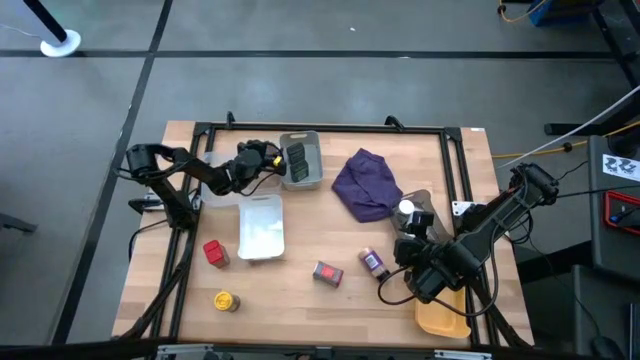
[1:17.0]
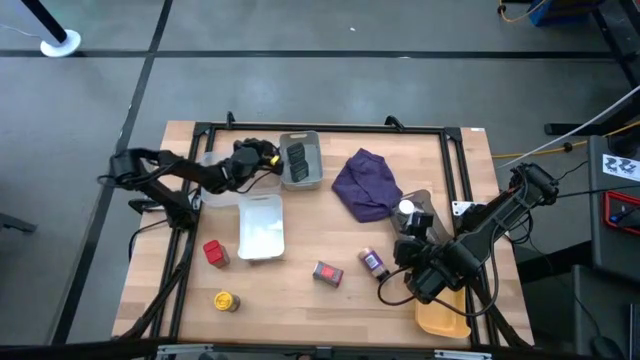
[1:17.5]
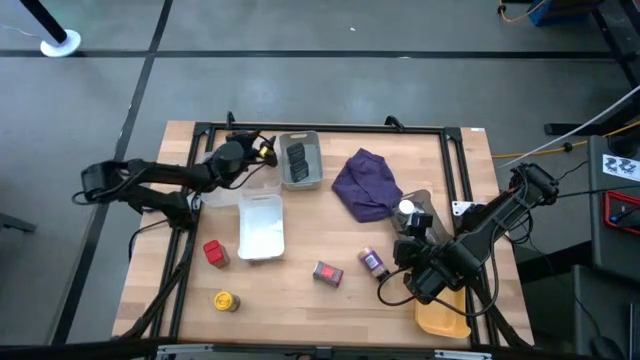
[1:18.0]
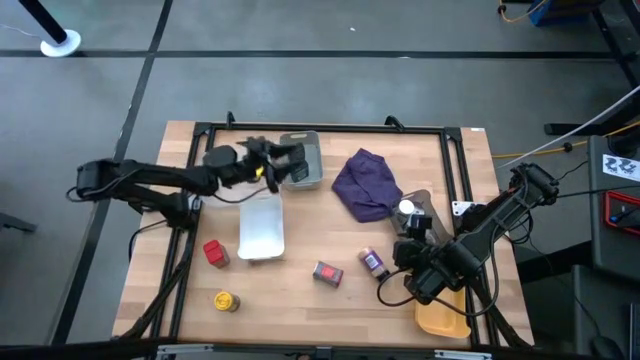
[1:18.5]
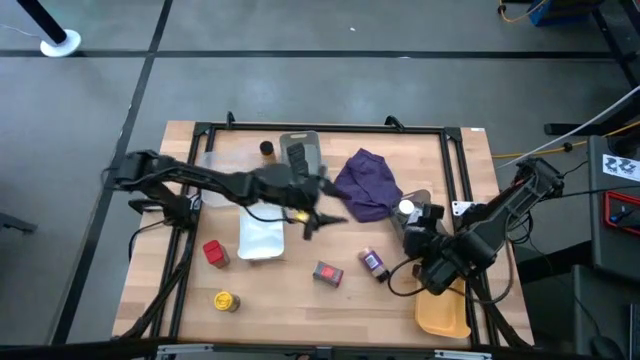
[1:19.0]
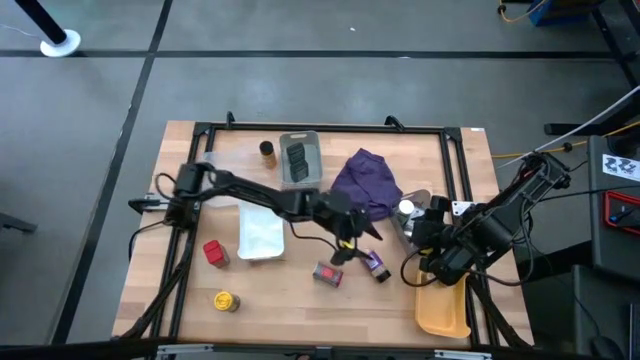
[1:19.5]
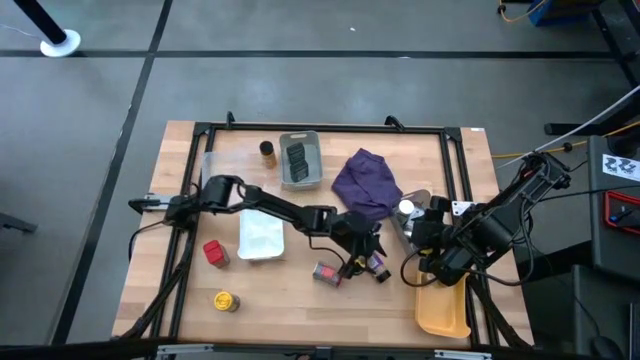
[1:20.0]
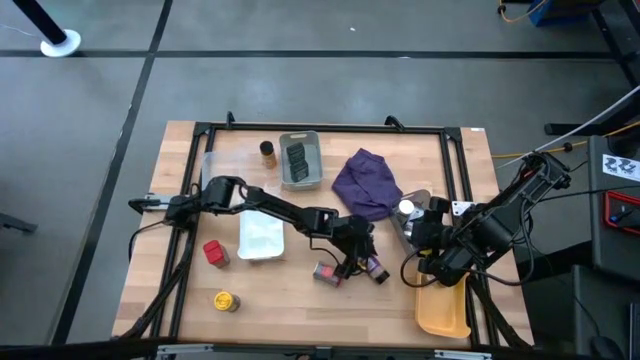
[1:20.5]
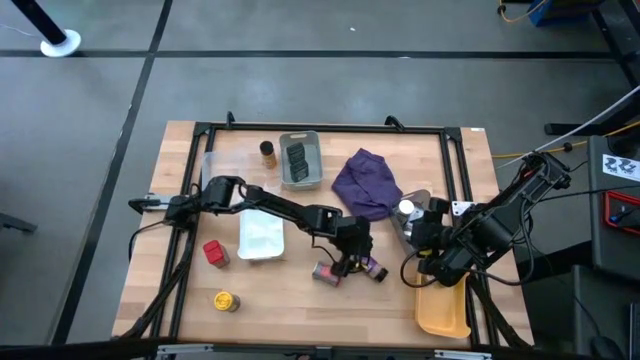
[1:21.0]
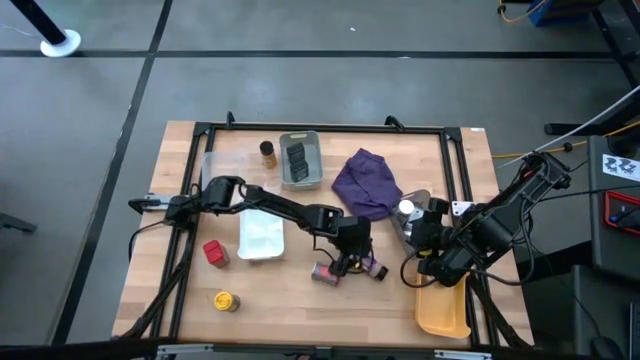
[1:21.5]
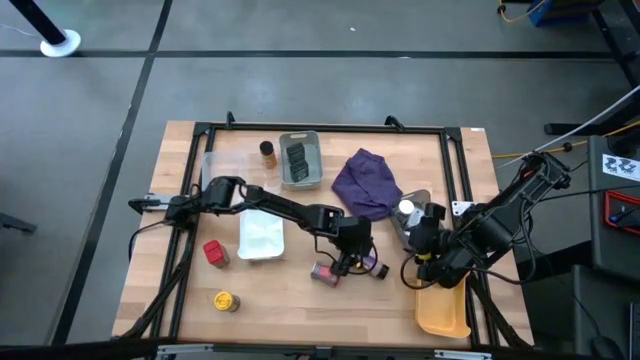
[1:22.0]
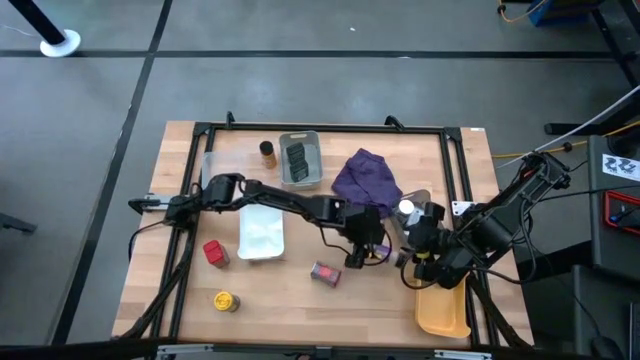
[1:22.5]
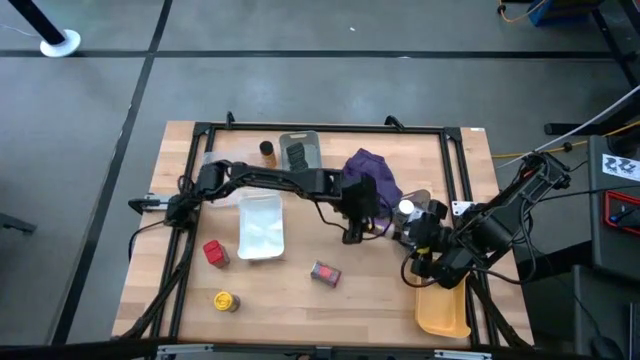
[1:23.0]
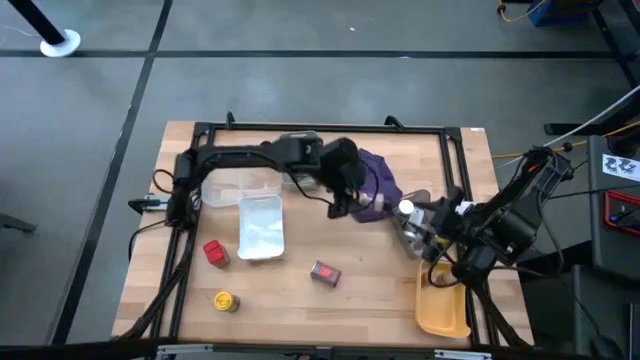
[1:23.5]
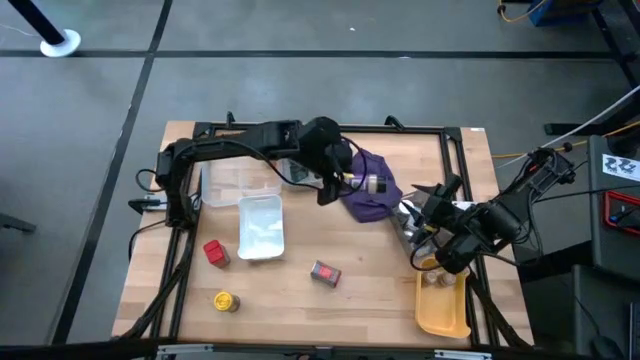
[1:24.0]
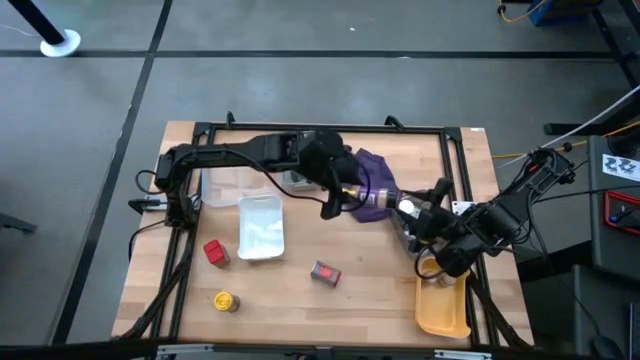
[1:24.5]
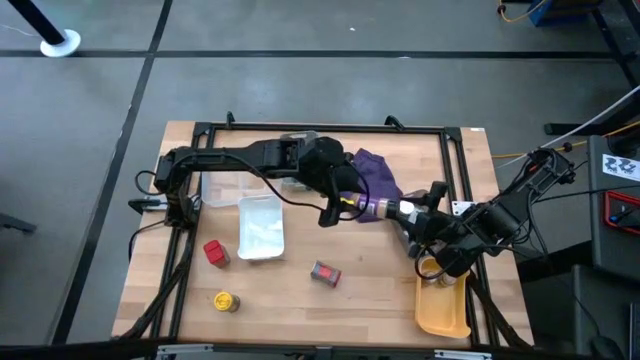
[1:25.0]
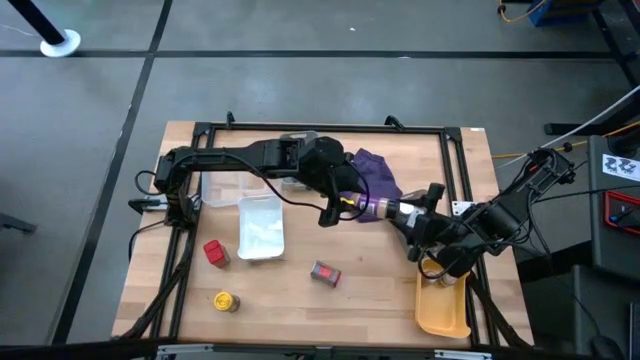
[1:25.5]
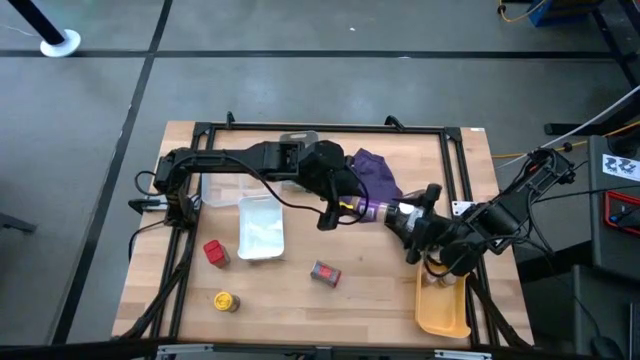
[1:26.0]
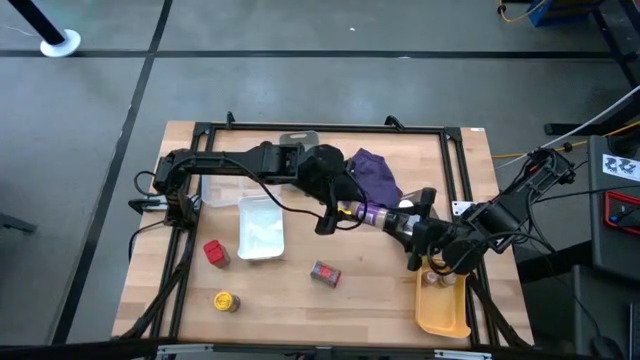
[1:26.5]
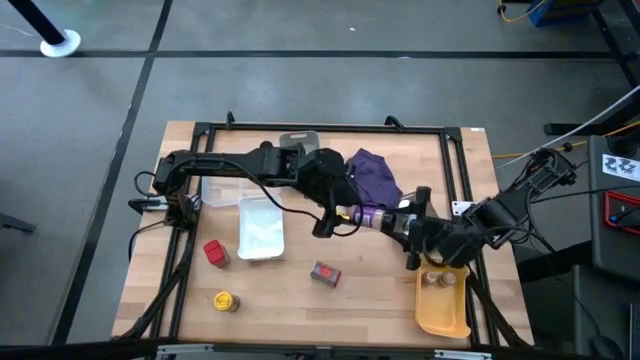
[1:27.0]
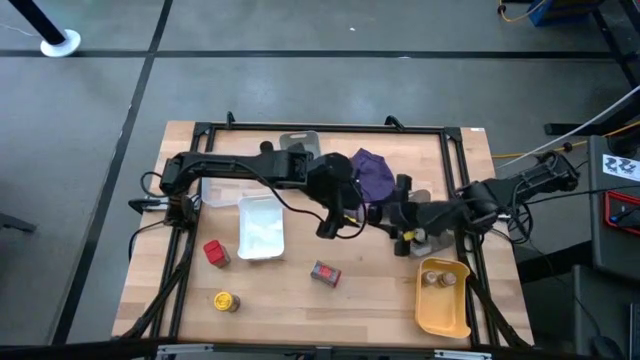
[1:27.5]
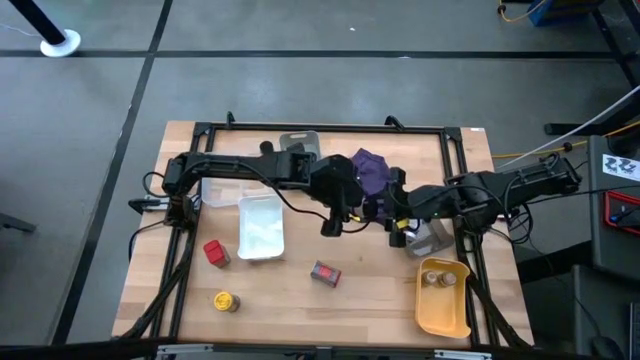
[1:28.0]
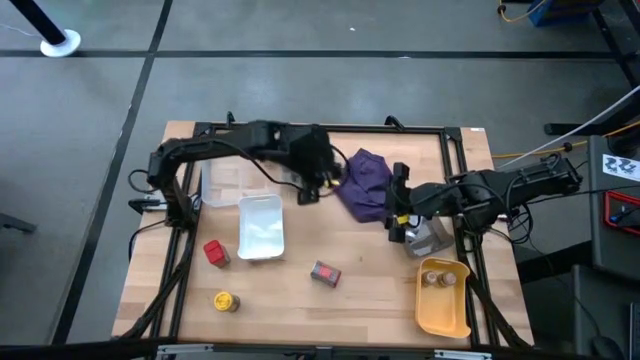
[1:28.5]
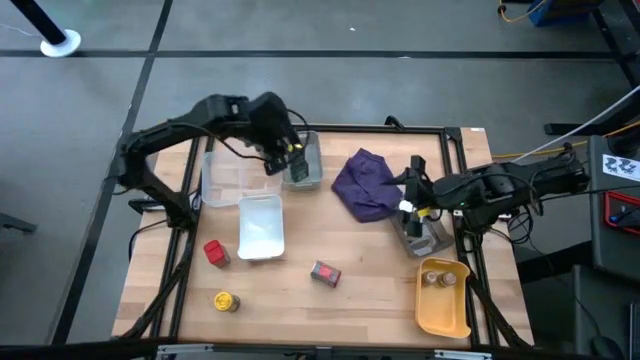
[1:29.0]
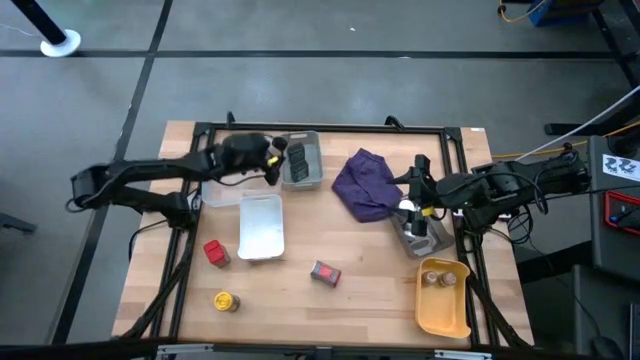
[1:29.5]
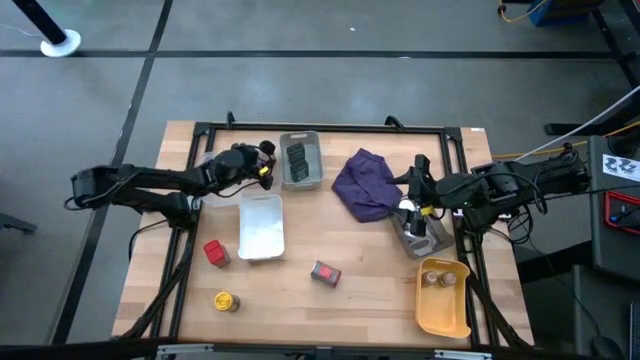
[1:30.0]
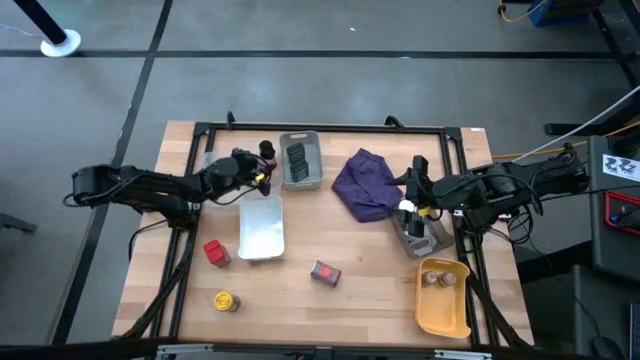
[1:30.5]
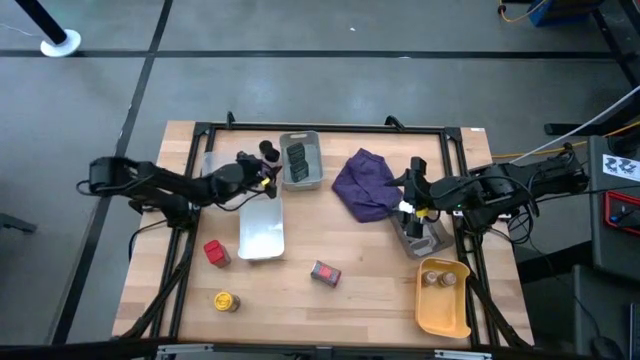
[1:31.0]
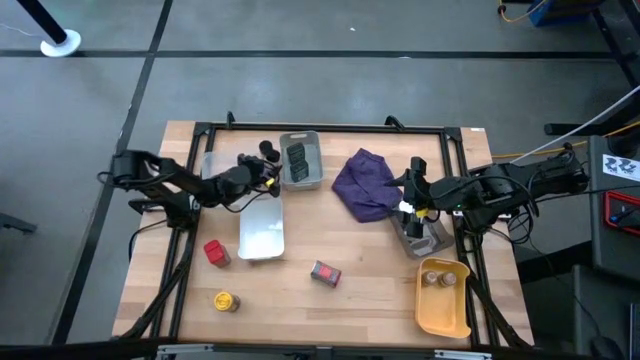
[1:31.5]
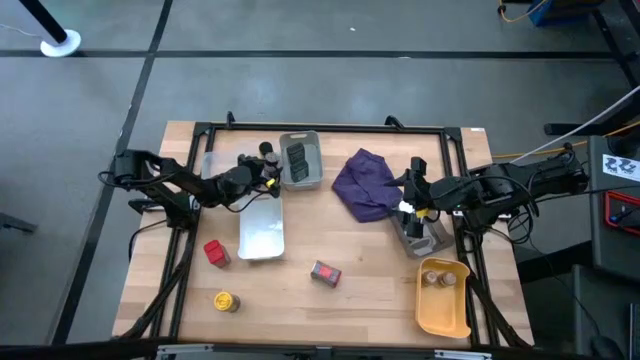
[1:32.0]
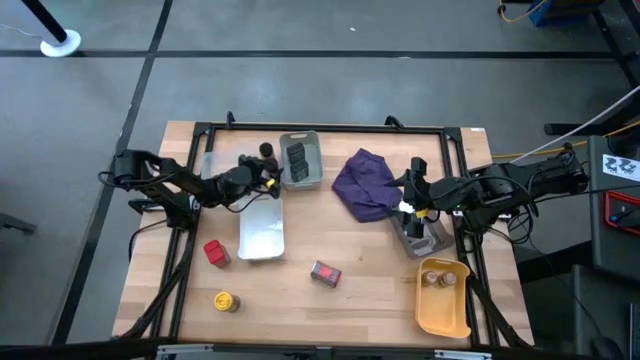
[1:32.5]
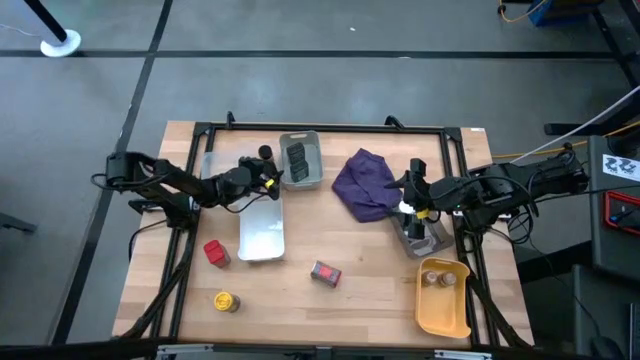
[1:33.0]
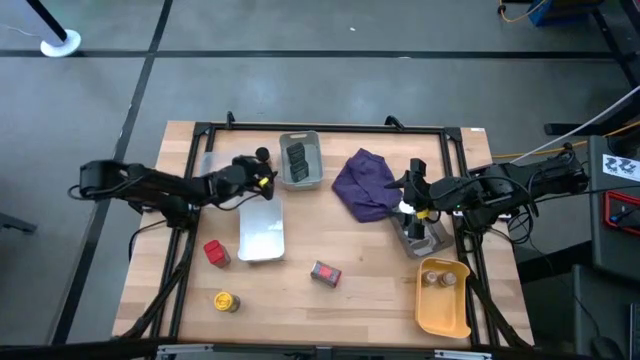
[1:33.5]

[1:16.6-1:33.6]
Task: Sort spices by type
Put the black seasoning bottle into the top right transparent bin

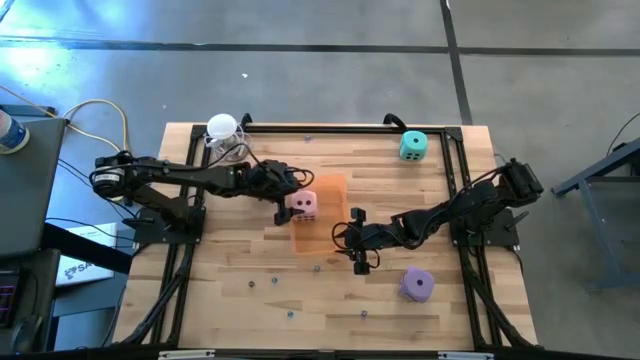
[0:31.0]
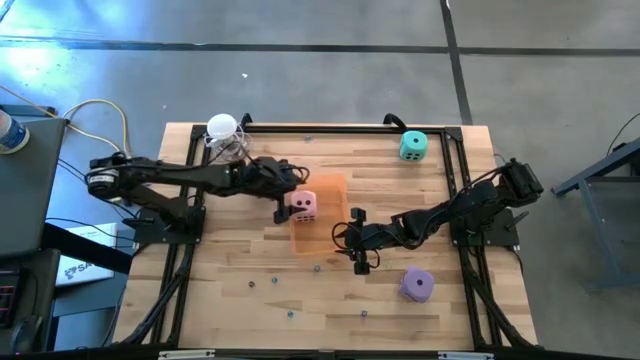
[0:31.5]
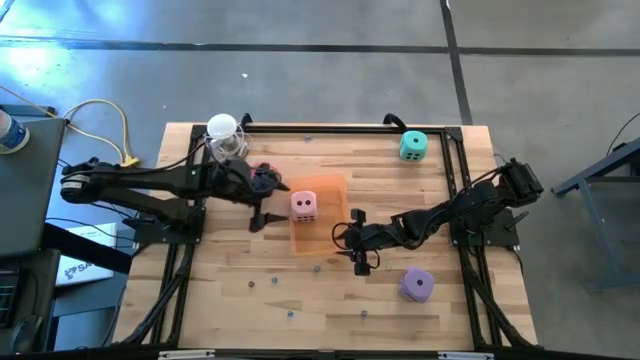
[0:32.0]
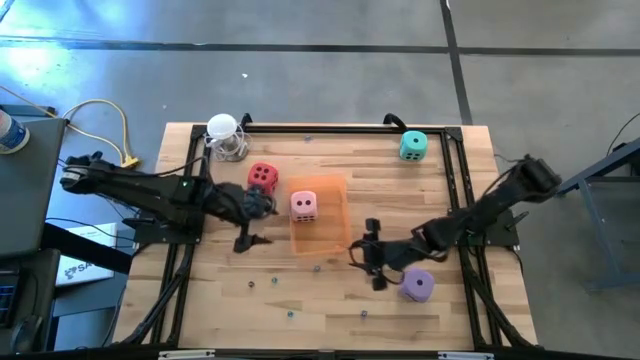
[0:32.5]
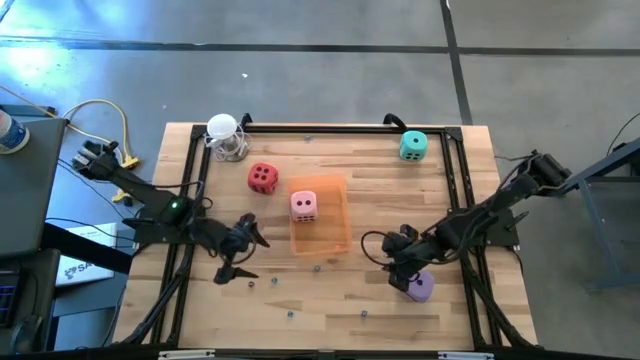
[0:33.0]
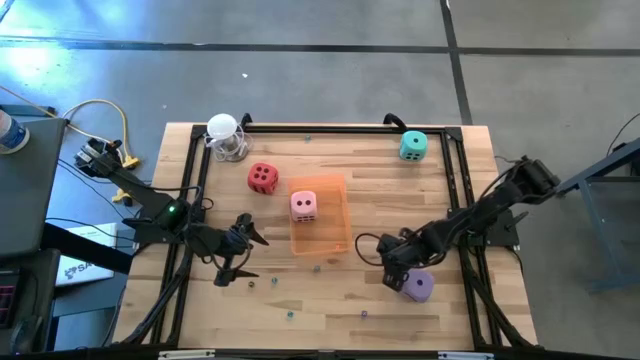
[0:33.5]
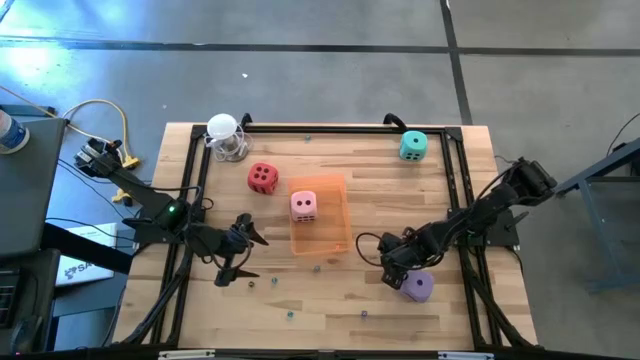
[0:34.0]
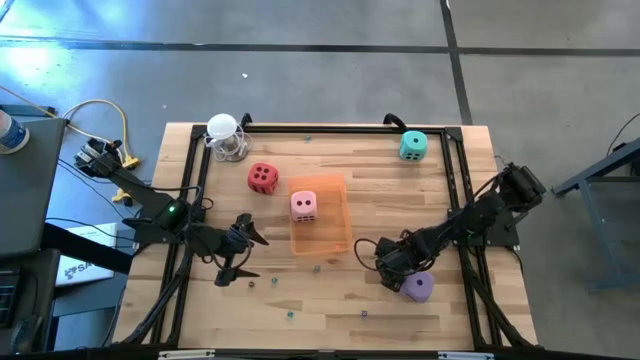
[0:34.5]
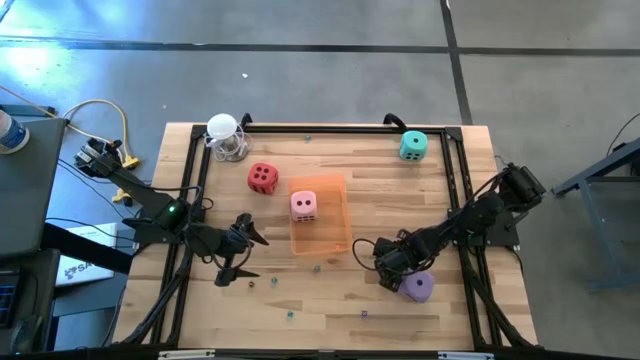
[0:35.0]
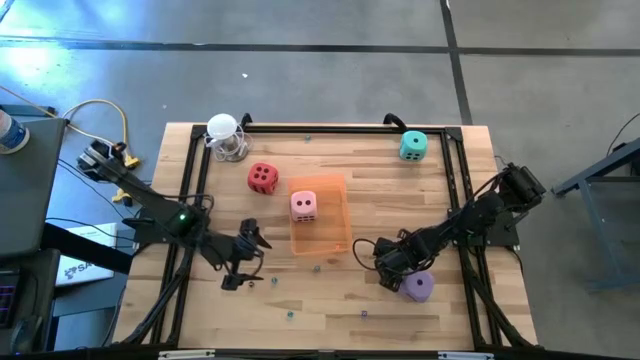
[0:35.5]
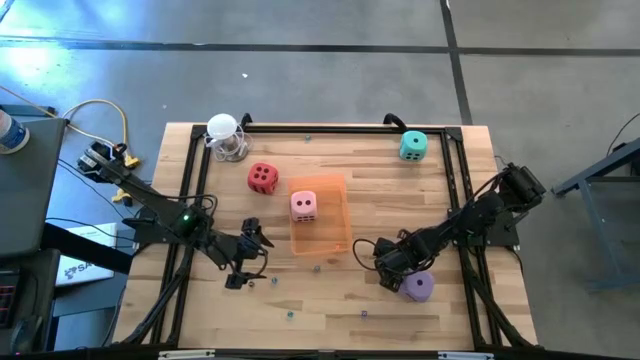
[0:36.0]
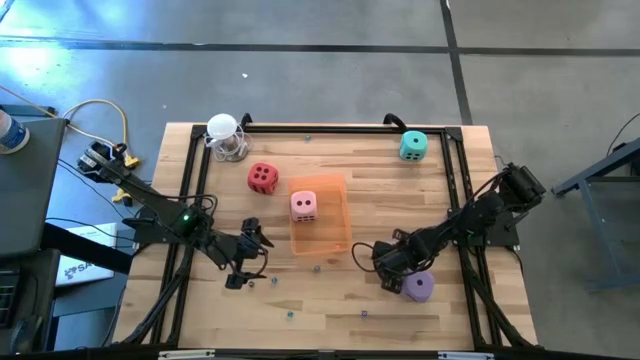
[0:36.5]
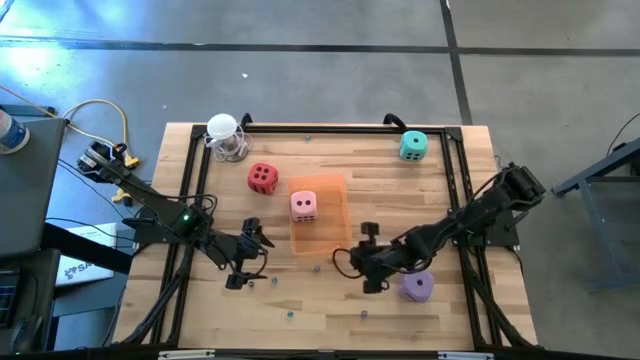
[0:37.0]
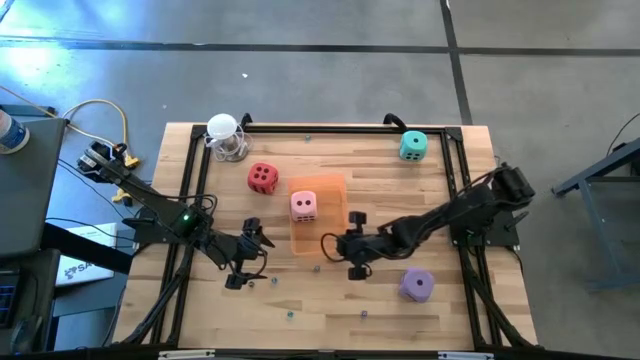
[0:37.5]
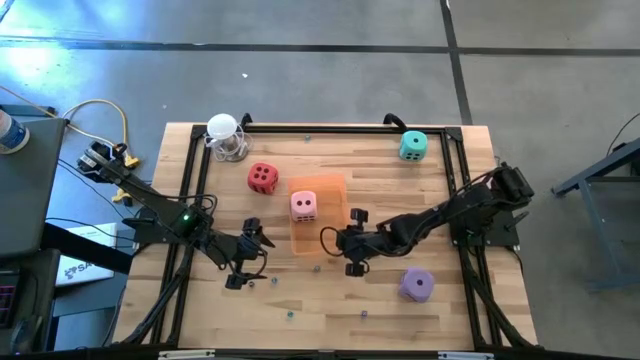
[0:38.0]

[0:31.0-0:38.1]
Task: Pick & Place Dice
Put the small green die into the orange bin
